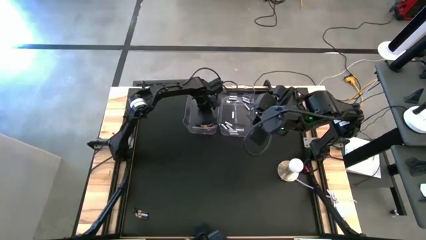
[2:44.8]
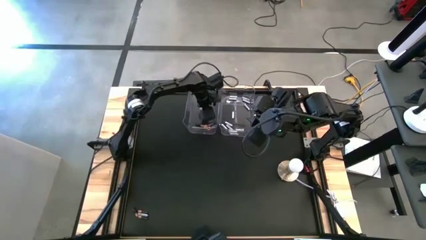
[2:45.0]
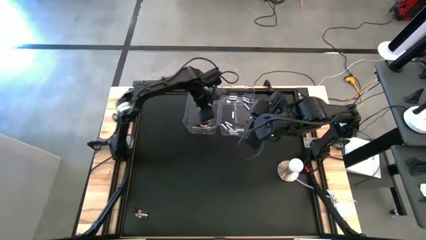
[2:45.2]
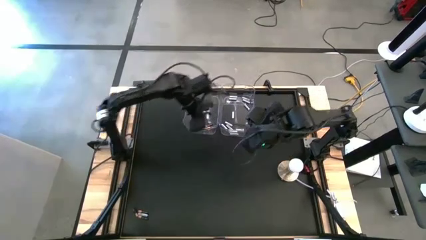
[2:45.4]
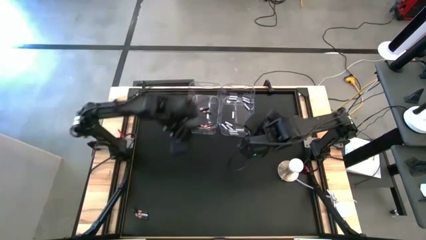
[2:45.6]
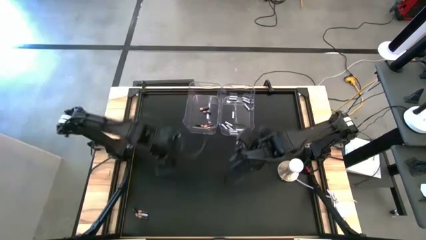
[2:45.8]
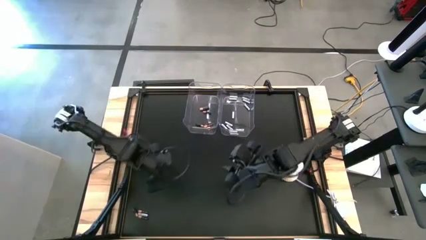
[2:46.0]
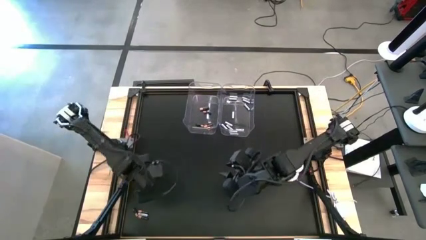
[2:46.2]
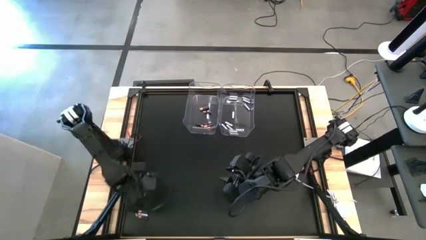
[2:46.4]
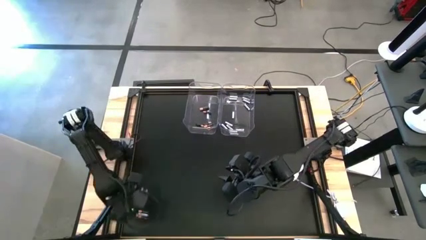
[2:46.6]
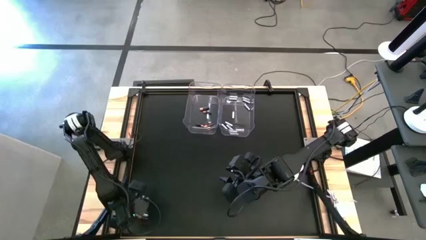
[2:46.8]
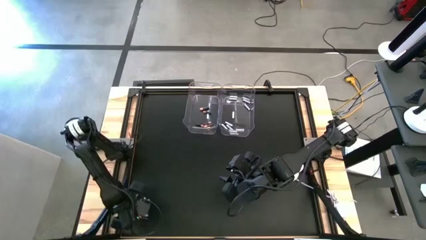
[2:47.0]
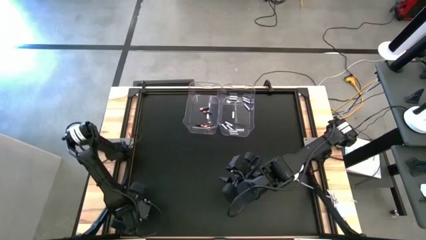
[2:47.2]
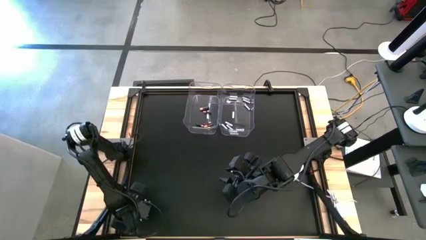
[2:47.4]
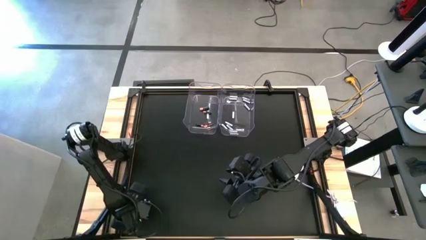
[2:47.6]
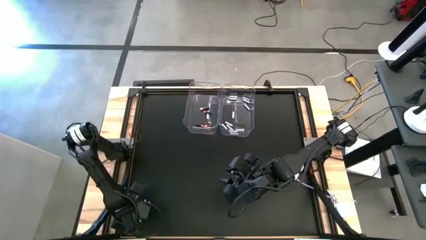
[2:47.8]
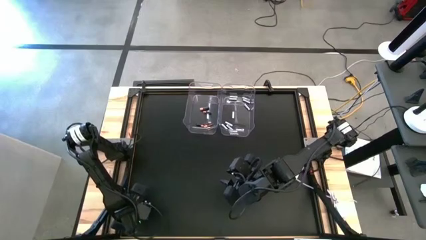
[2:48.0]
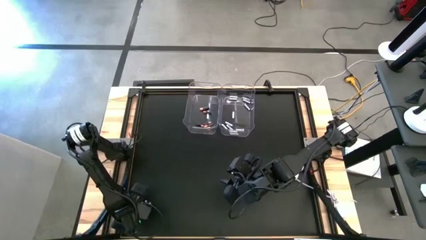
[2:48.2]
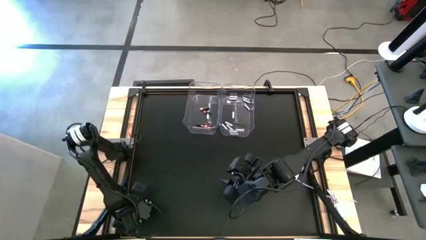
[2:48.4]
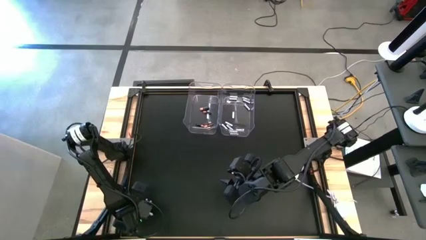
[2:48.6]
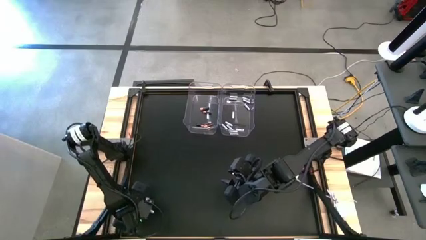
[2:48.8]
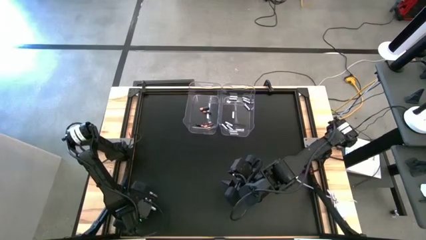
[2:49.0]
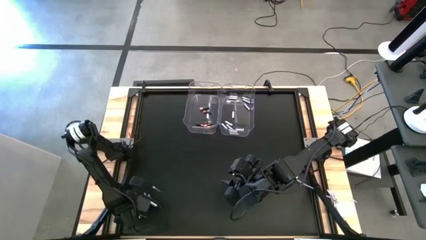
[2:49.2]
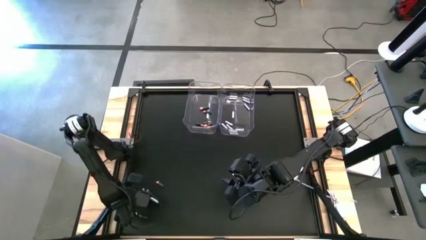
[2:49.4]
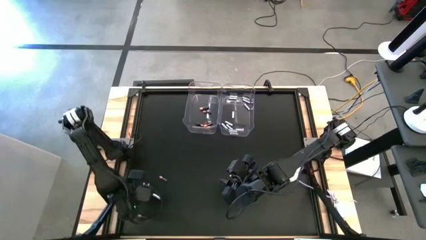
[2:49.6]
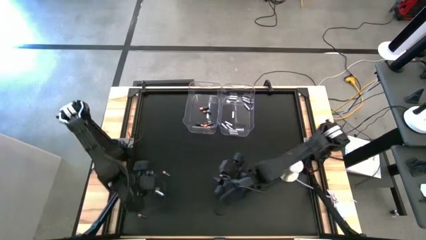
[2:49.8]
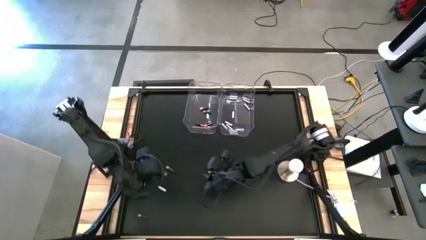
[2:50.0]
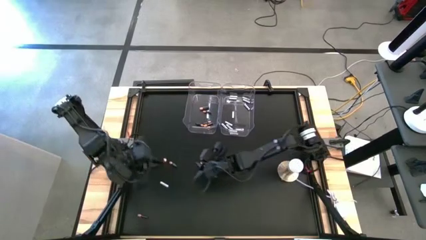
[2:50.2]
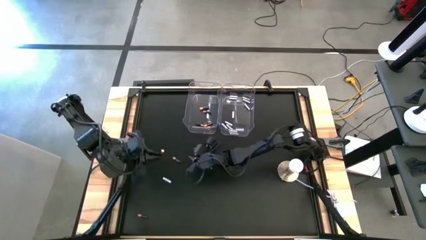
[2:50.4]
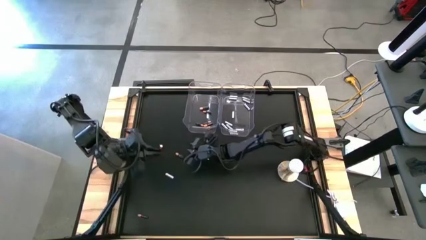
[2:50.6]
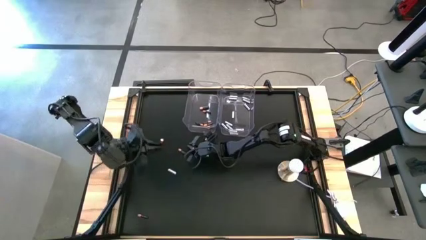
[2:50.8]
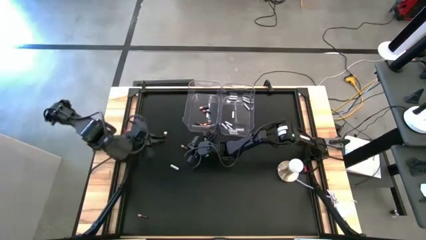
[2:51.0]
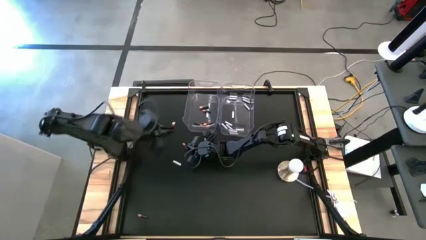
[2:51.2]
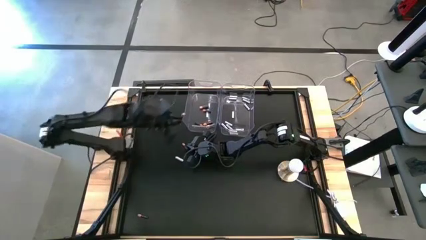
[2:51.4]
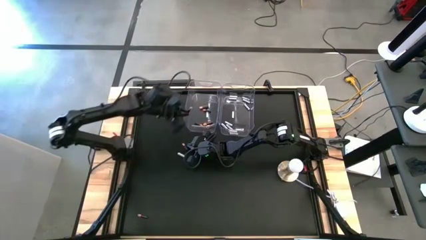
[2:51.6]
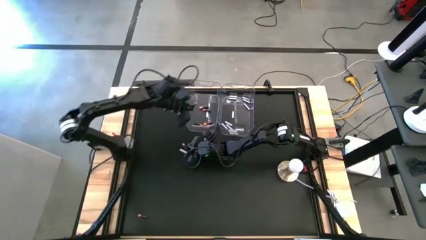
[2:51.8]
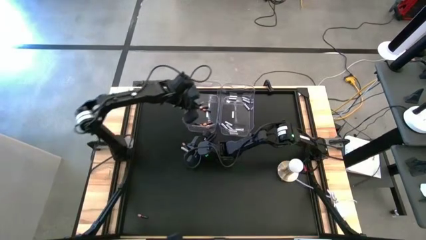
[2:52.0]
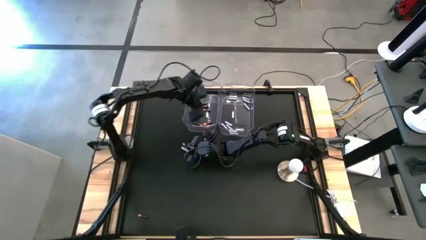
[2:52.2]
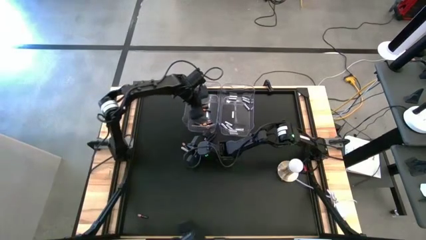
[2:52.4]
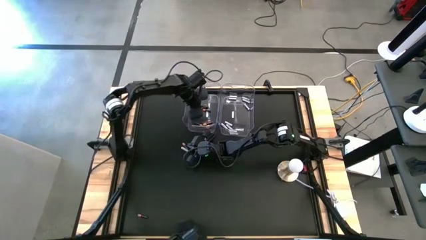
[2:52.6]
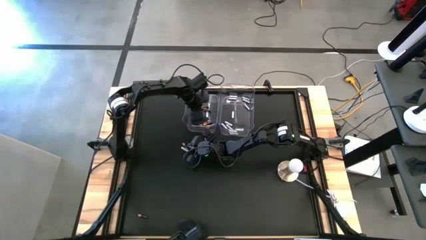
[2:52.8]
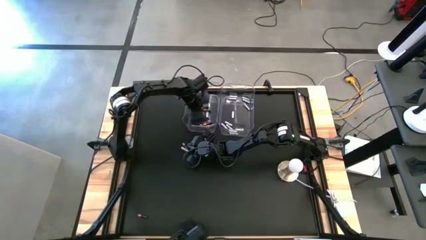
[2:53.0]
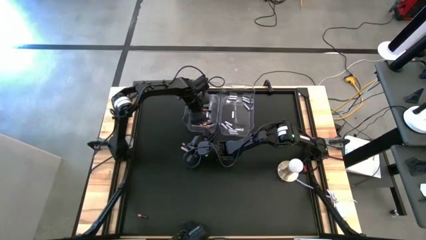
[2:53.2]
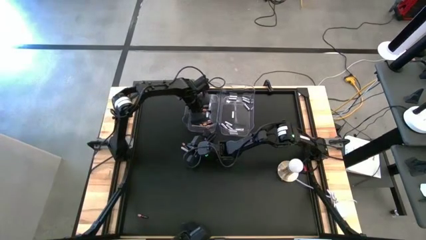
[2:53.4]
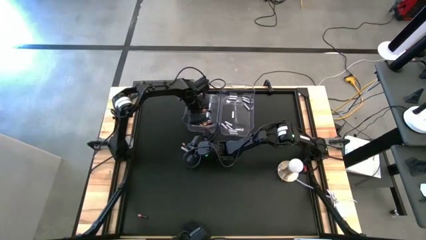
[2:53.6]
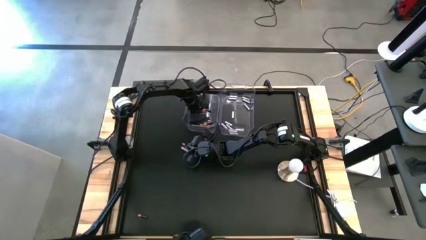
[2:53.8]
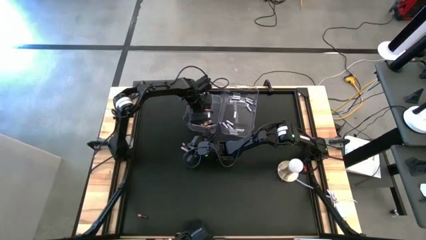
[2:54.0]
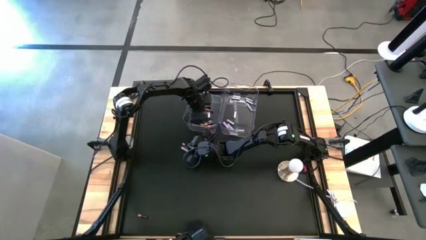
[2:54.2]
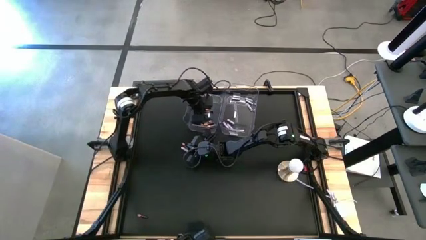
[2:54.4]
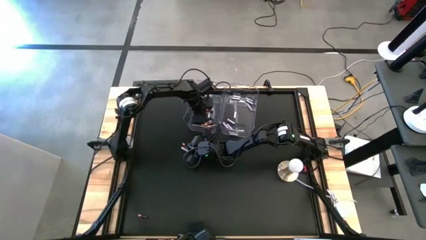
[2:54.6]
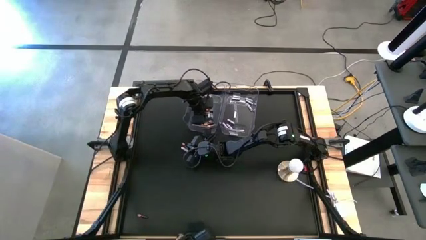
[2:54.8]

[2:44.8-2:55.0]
Task: Sort batteries
Put the black battery into the left transparent bin

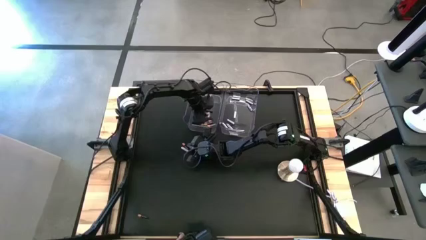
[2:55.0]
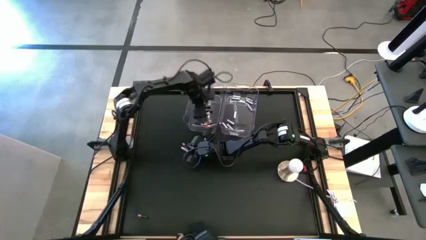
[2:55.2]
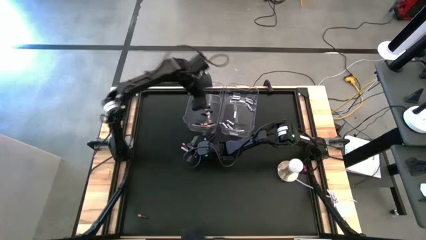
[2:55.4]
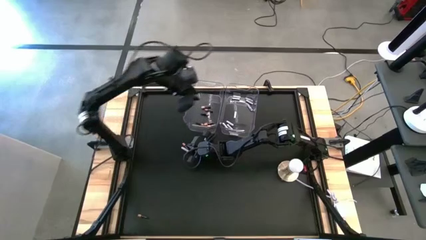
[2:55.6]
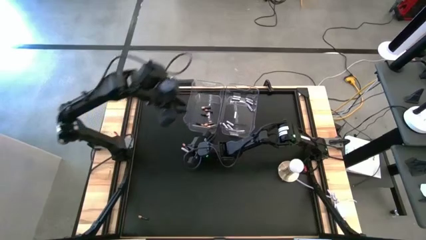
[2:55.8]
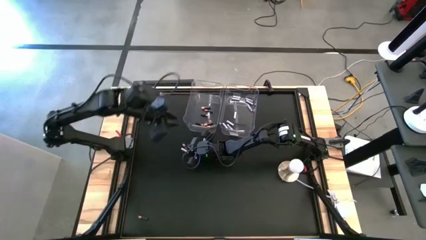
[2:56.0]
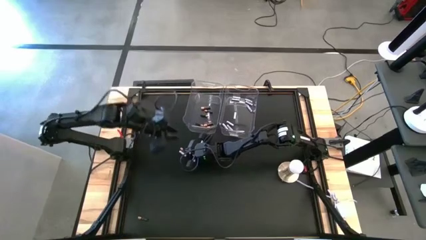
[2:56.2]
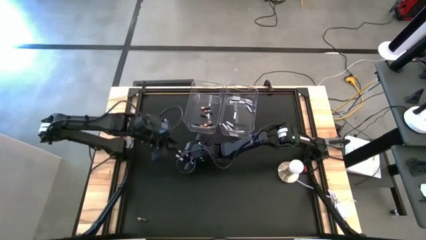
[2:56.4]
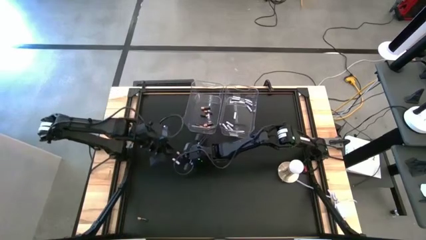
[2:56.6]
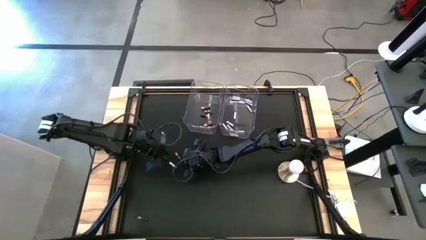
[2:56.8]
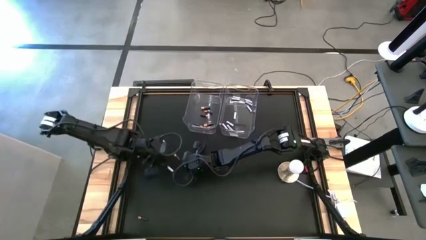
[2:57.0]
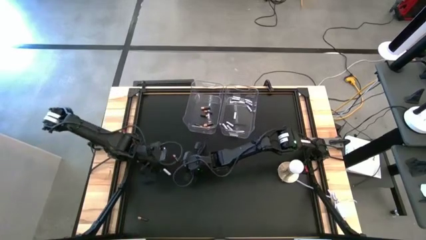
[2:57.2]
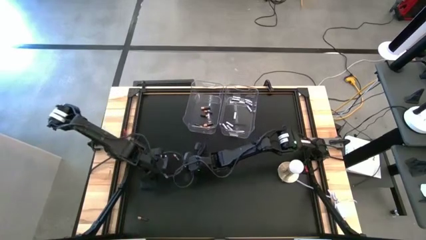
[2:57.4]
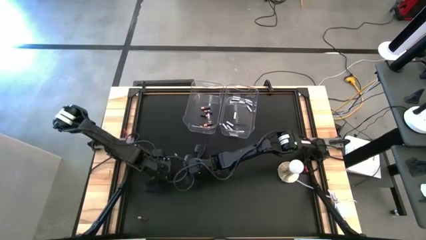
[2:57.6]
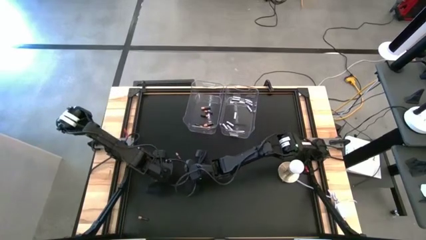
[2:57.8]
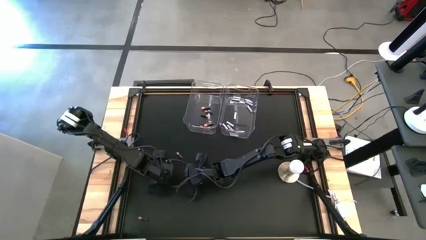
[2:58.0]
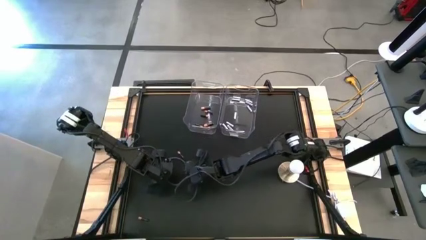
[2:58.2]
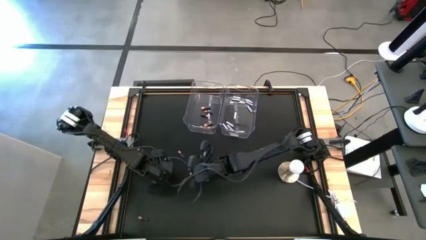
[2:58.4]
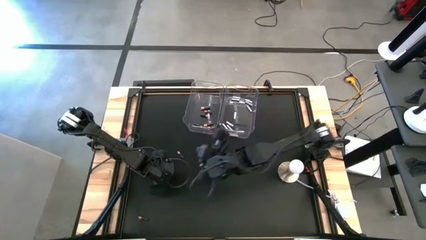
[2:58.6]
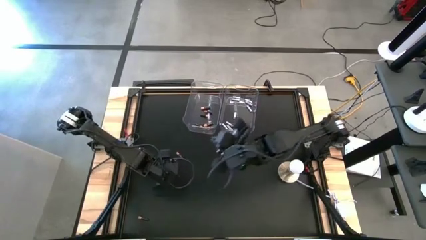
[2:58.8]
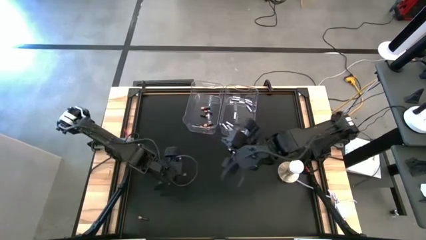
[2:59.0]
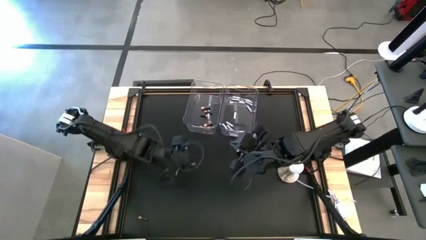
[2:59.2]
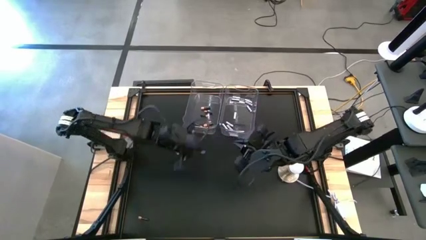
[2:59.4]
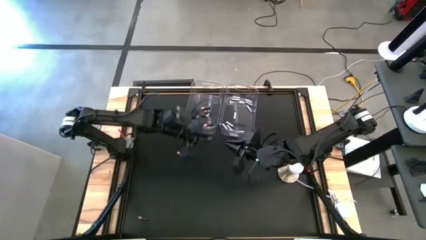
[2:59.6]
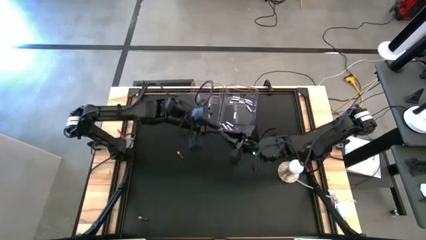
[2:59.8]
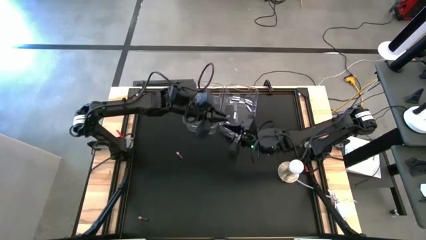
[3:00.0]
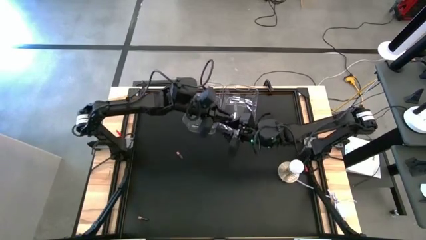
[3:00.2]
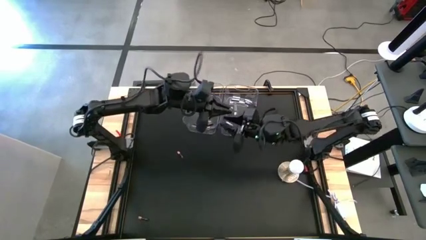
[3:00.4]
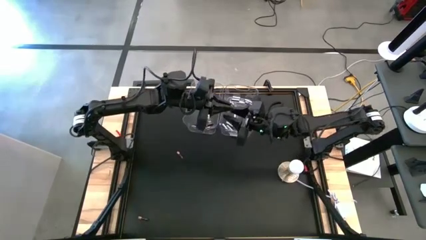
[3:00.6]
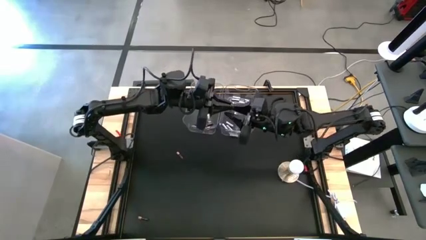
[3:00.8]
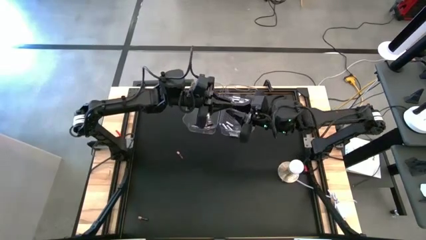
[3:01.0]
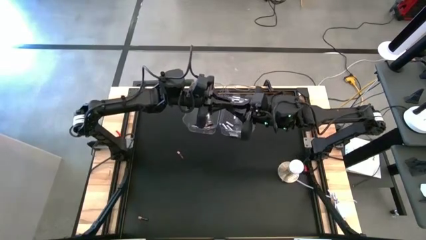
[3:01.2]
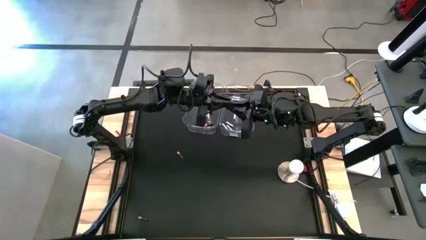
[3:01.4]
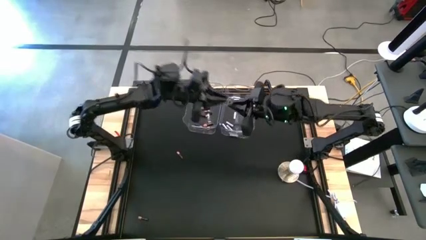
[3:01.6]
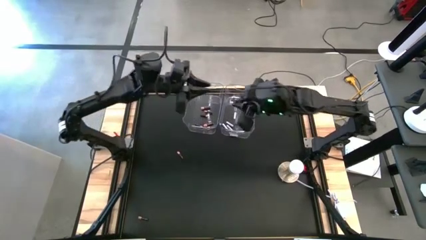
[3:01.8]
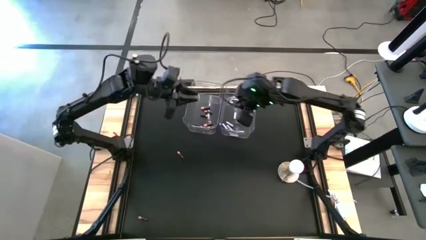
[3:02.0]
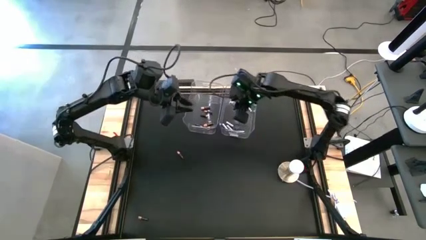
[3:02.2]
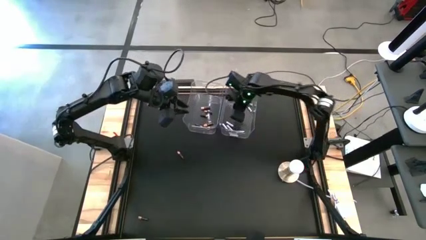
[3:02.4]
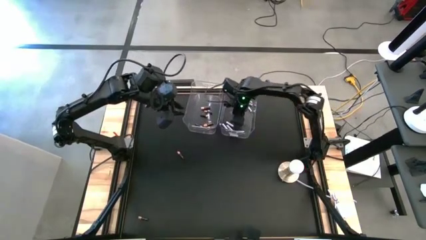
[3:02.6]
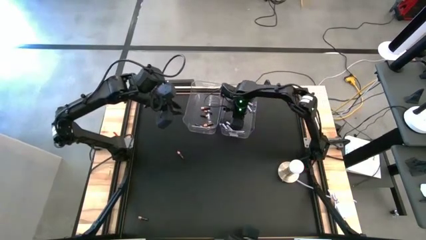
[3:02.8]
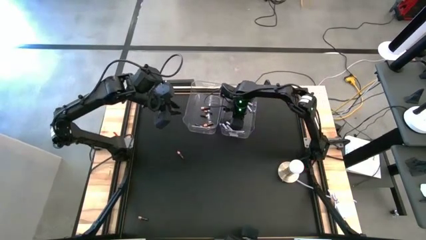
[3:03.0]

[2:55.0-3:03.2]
Put the white battery into the right transparent bin
